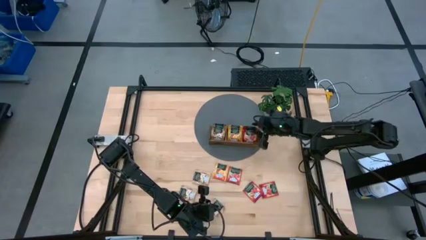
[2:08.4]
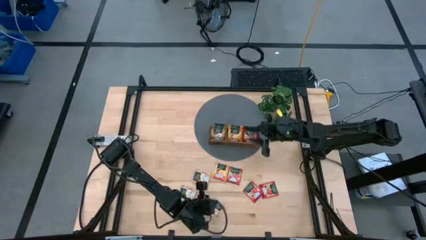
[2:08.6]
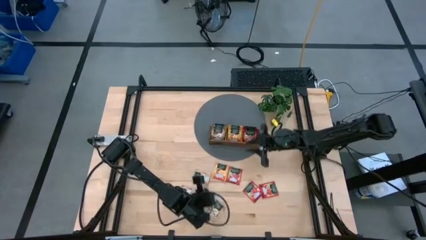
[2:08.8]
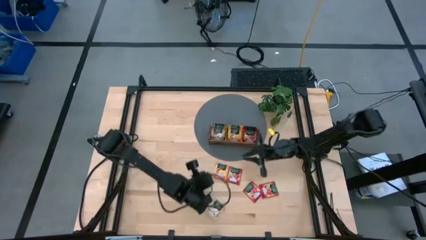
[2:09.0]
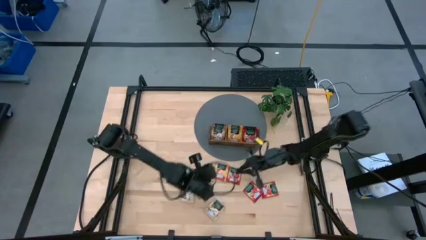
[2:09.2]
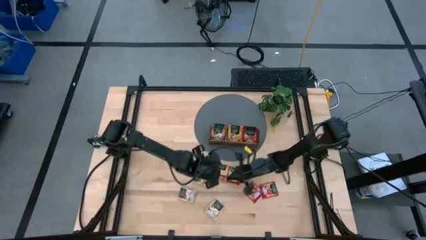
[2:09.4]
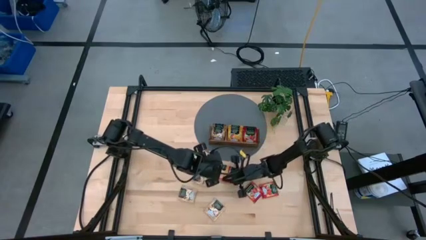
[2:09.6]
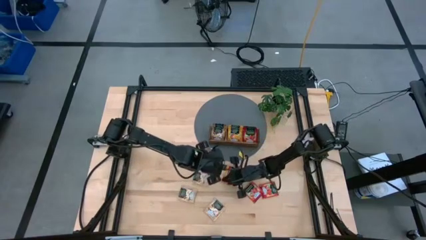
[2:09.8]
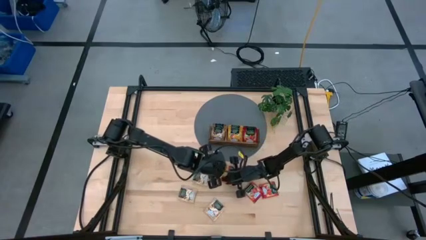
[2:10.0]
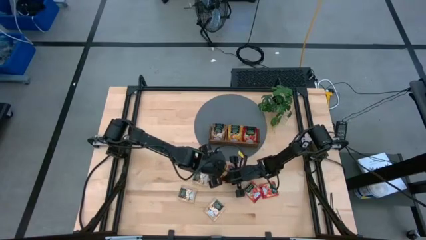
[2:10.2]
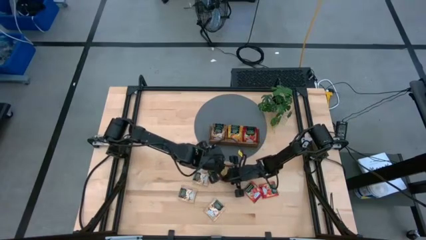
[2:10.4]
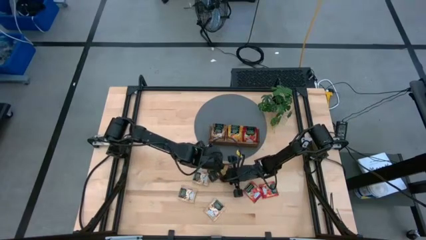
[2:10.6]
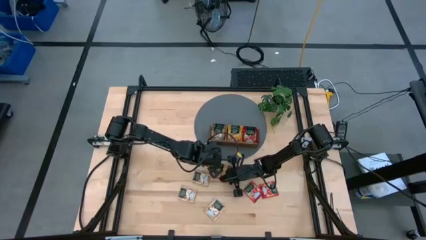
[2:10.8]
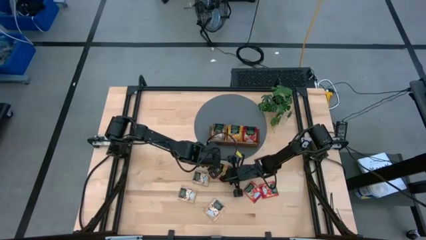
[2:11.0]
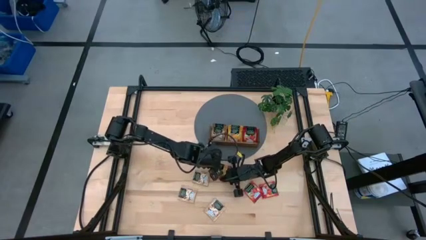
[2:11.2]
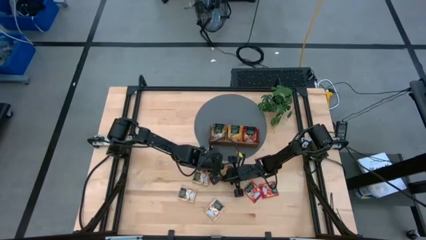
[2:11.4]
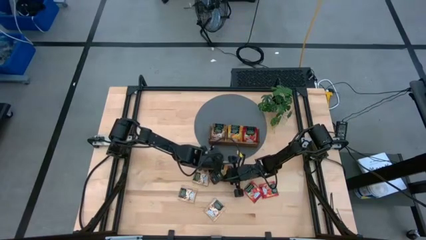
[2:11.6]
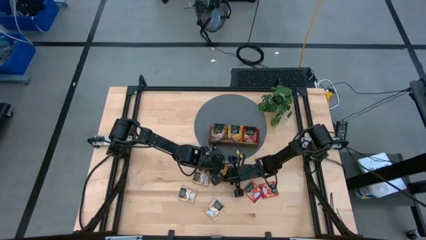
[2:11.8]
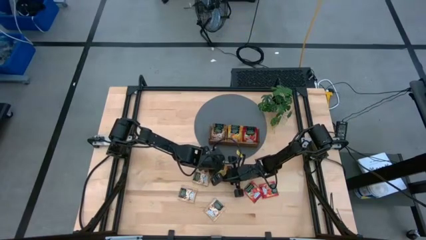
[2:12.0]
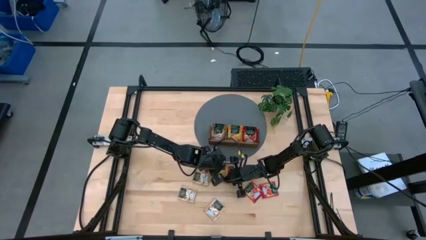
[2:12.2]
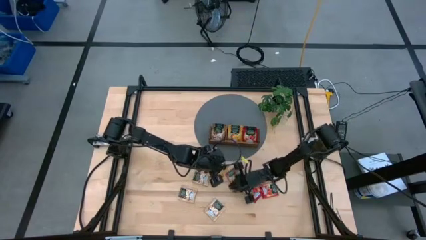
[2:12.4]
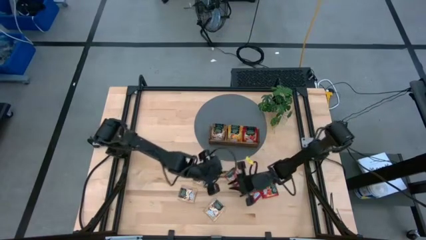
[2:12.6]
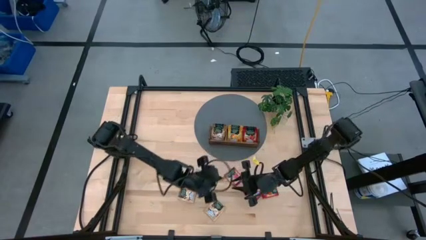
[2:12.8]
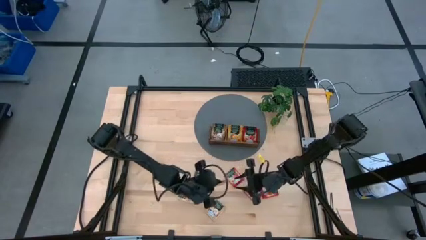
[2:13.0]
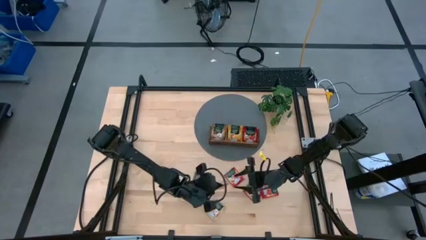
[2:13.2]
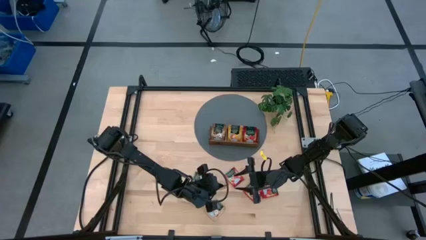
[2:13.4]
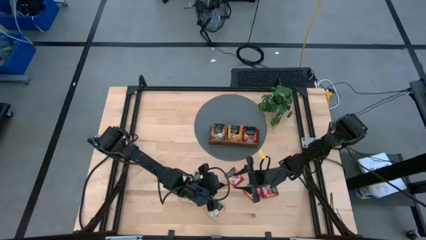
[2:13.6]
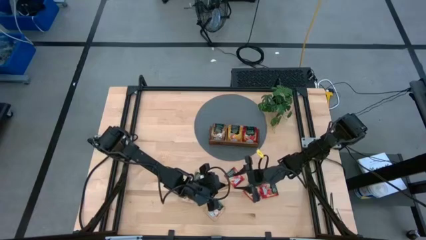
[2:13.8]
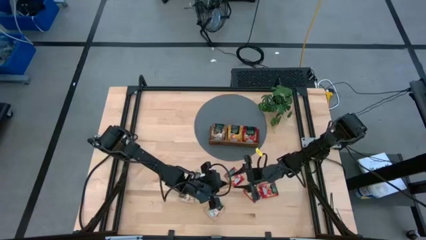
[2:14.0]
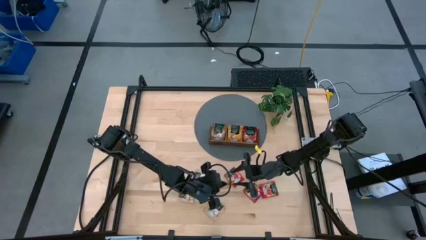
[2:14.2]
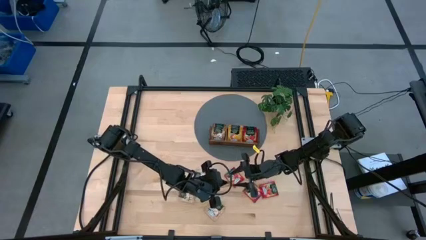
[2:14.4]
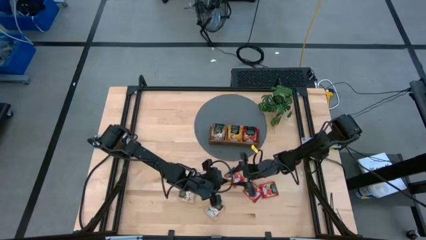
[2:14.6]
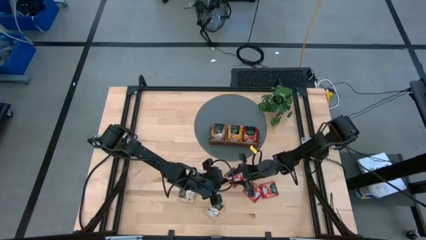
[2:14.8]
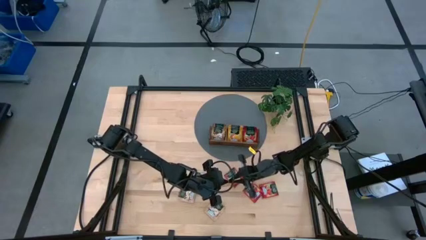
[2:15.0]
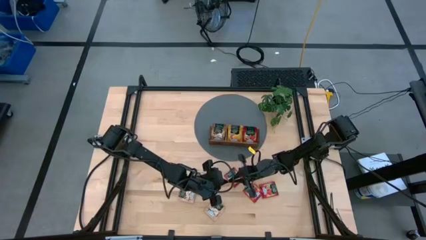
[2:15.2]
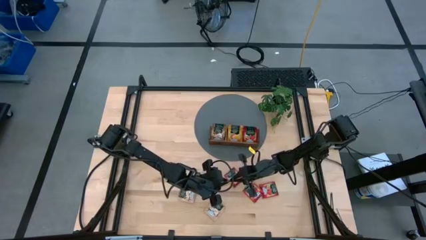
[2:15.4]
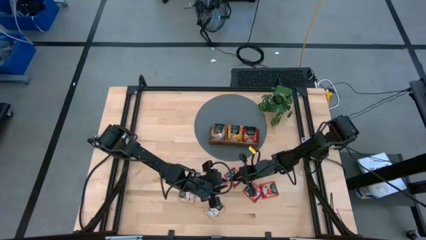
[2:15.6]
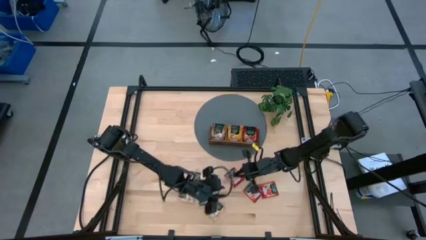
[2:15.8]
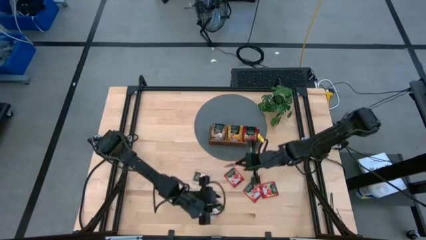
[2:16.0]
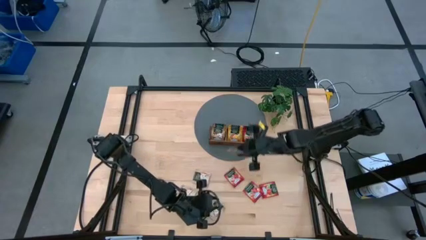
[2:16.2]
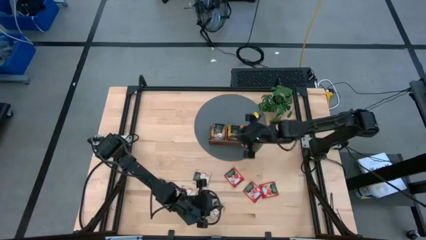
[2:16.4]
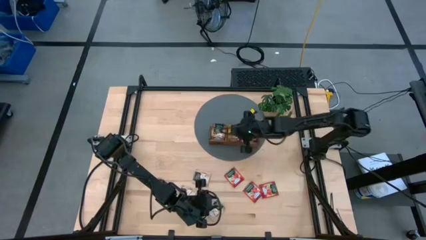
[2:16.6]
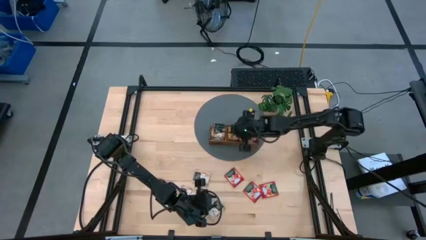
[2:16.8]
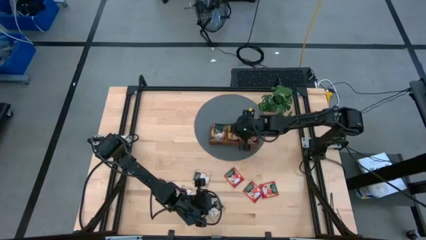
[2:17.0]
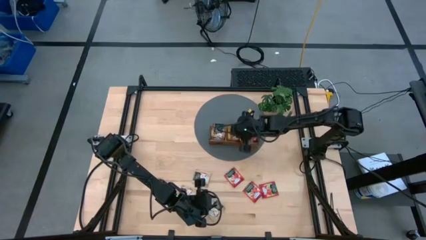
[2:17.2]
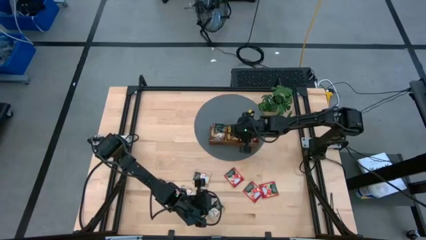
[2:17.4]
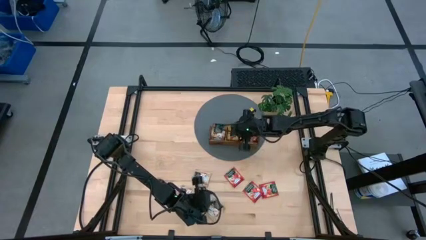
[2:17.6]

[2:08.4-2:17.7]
Task: Pick & Place Tea
Put the orange tea bag into the middle section of the wooden organizer

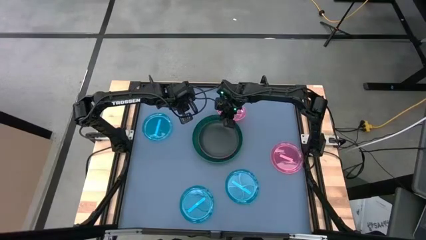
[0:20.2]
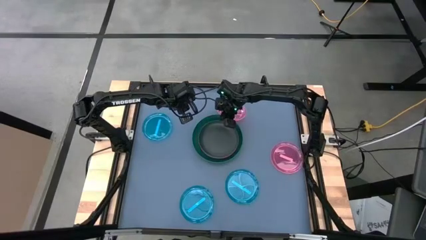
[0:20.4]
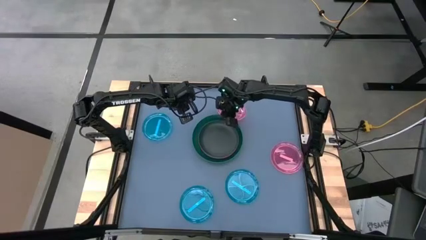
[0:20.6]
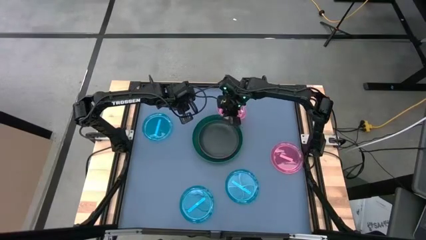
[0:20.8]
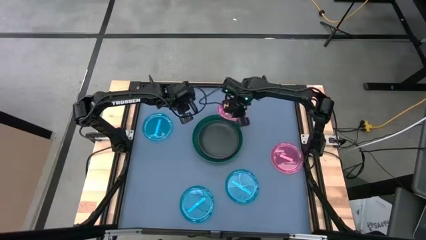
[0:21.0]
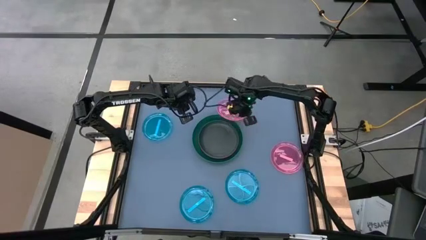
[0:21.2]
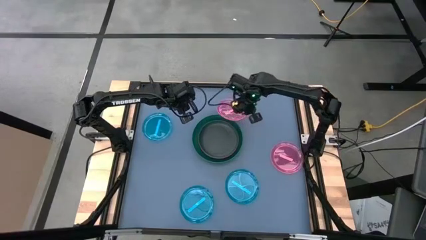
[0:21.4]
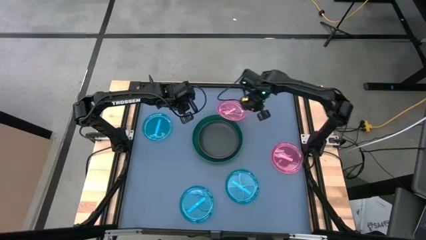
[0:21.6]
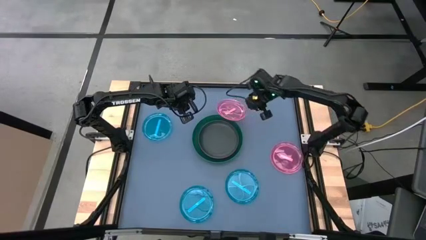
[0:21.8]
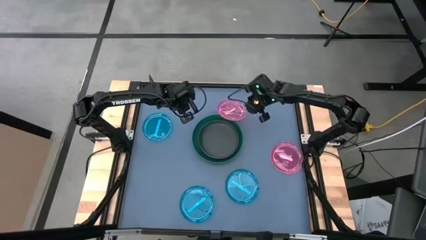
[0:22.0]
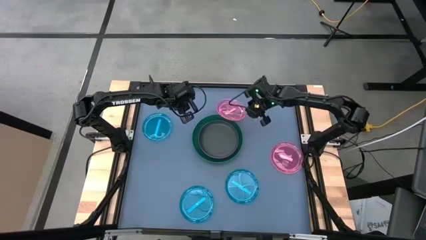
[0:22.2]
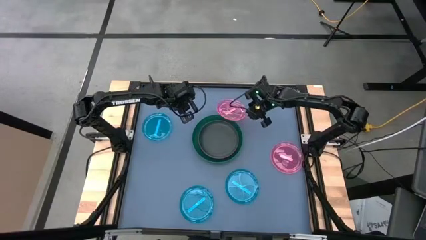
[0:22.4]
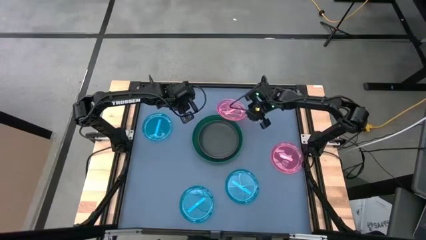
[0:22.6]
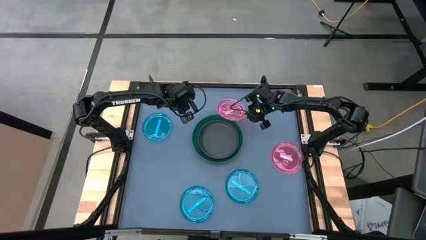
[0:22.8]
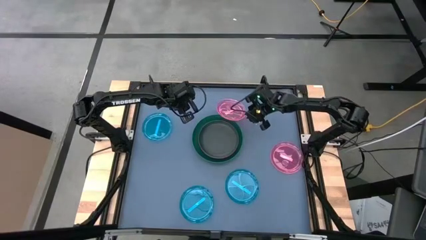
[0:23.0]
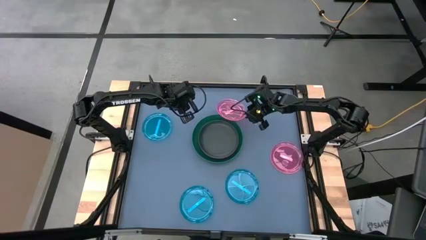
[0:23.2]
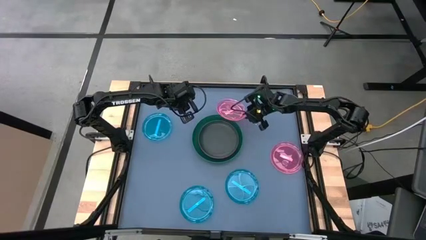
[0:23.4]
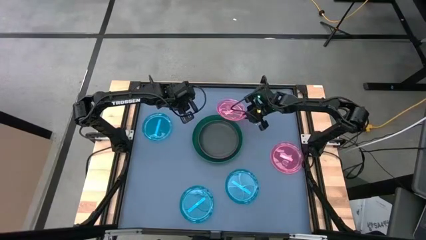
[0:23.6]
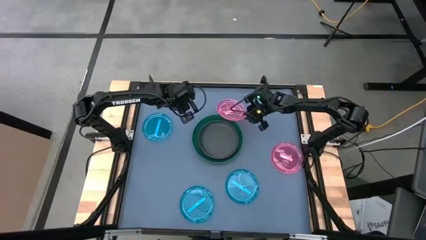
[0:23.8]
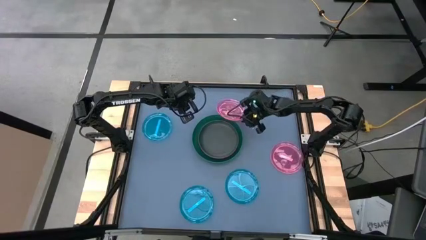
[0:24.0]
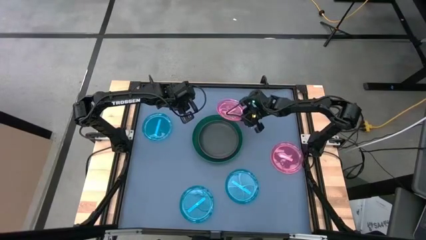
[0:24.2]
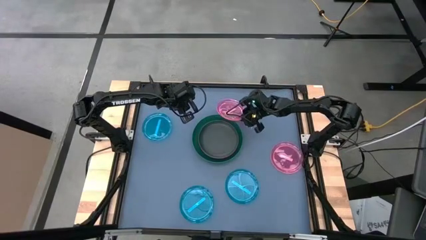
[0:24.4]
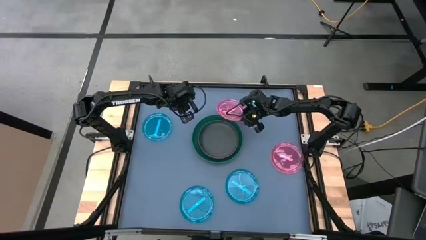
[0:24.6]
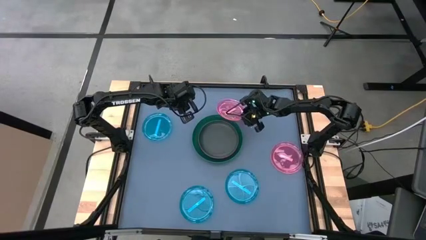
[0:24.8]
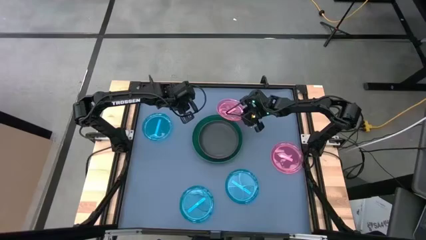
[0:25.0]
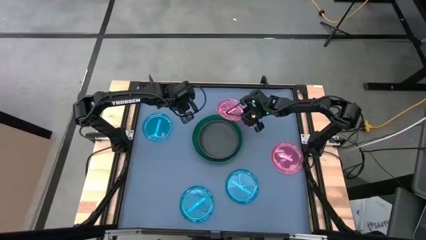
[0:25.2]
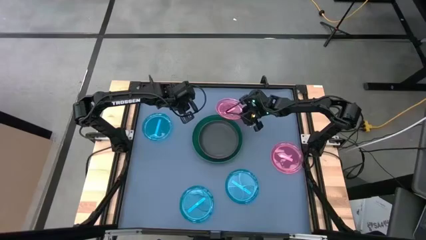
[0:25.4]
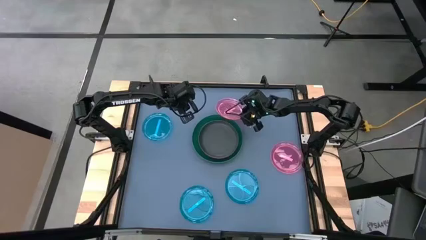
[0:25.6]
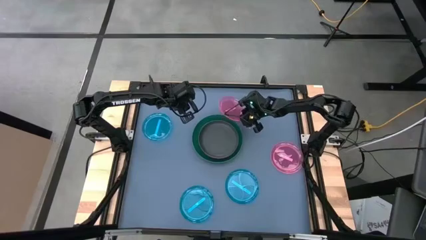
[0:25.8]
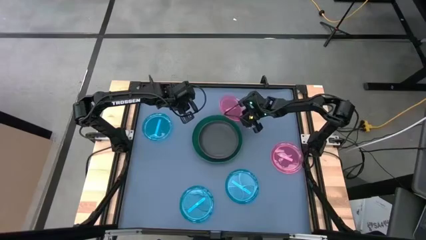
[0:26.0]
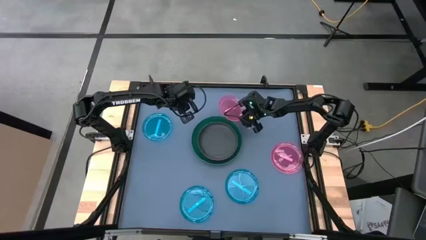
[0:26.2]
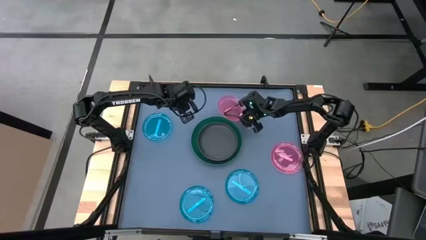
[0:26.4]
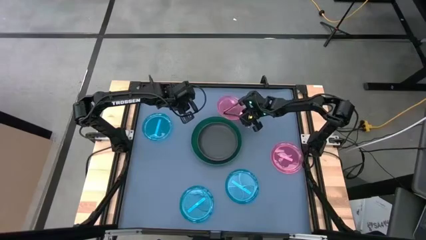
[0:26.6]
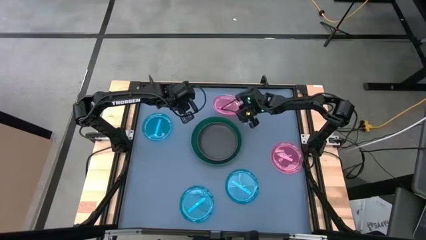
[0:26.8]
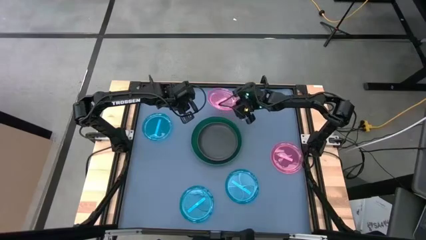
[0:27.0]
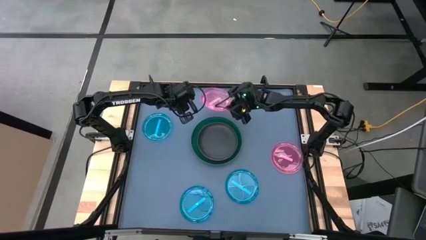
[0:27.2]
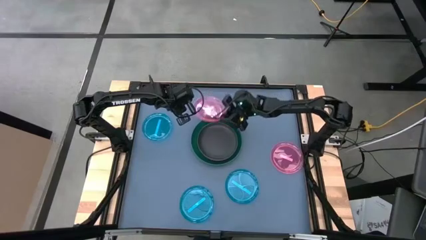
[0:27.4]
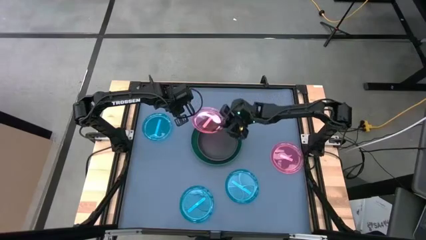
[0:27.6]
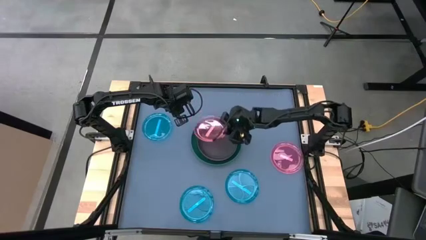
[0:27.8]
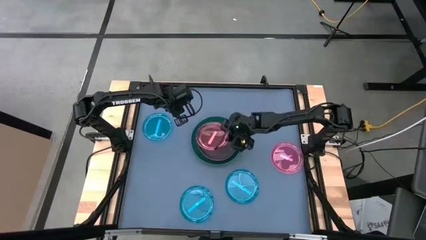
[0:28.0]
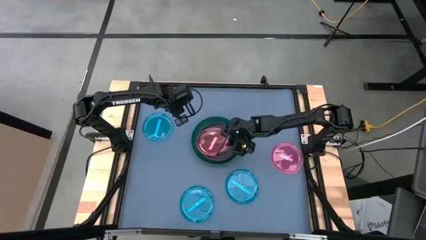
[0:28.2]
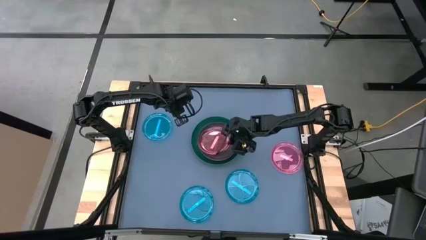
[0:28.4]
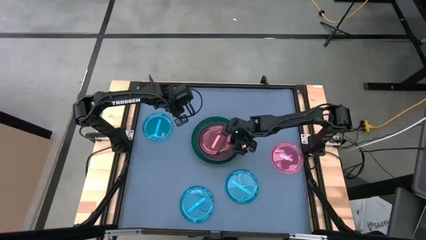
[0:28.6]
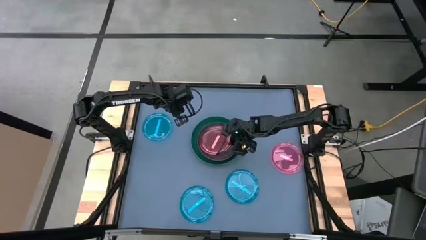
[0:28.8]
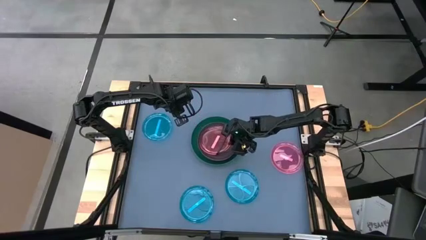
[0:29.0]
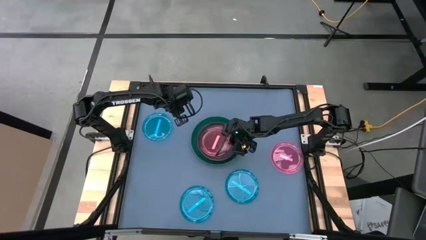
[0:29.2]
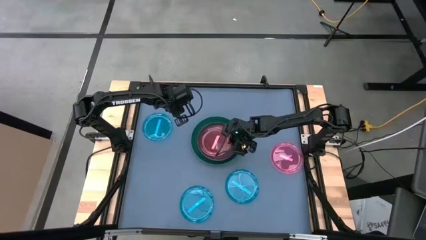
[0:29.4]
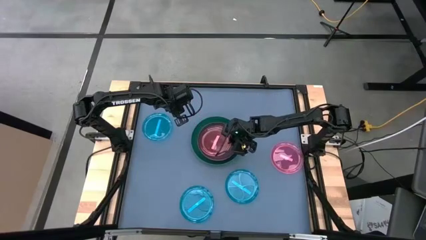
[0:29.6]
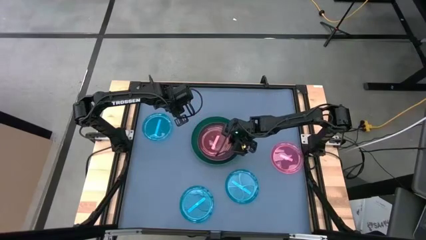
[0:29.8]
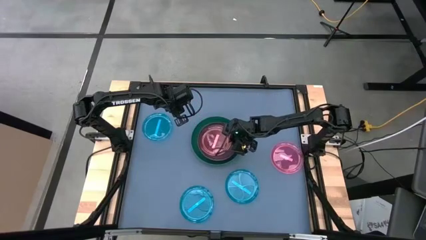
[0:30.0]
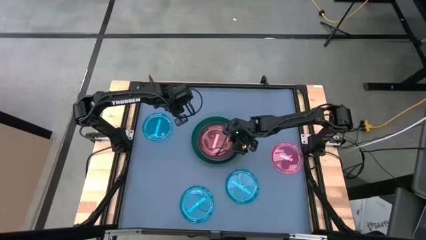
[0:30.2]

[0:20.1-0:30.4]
Task: Stack plastic plates
Stack the top transparent pink plate on top of the black plate
